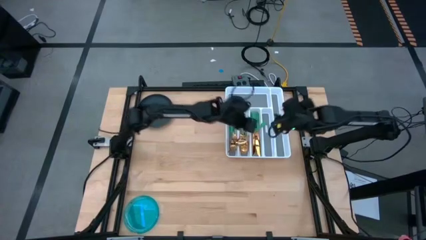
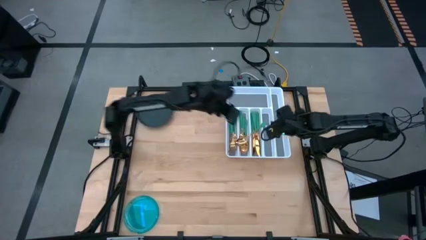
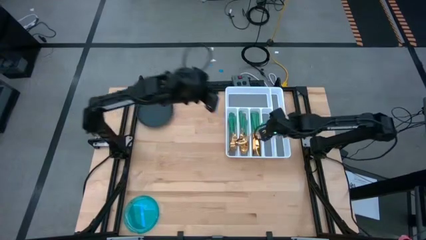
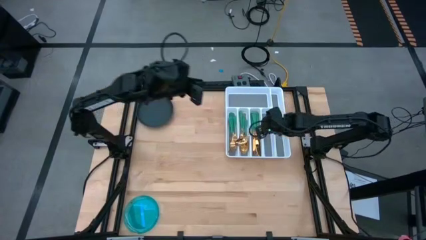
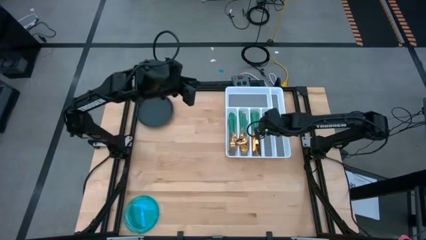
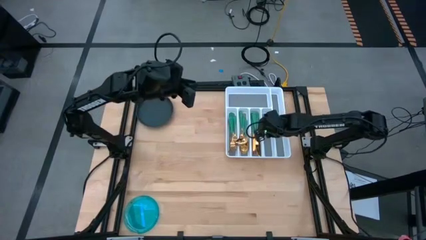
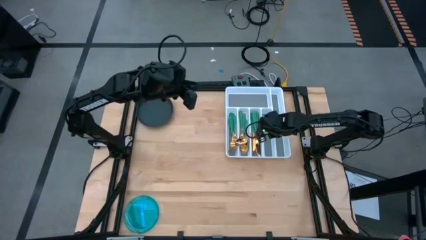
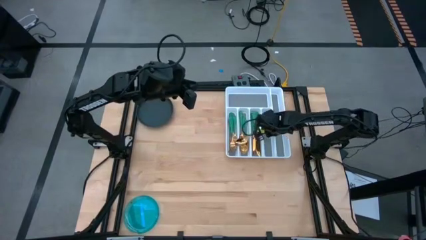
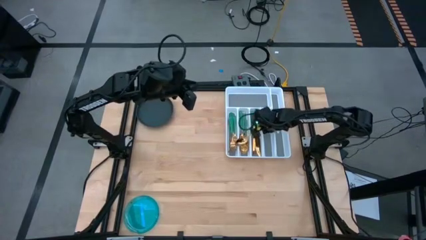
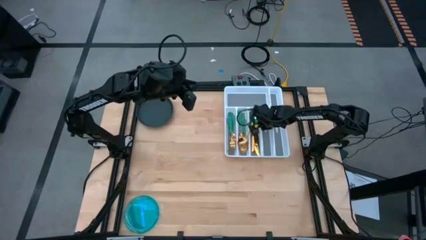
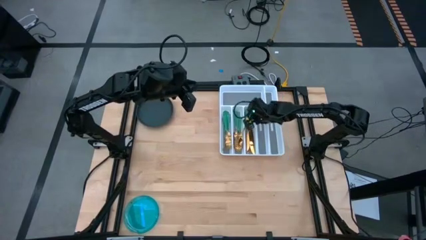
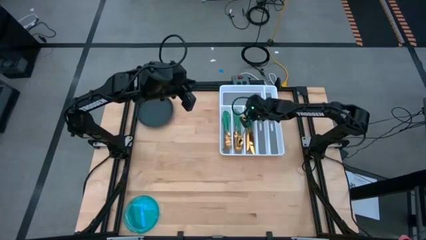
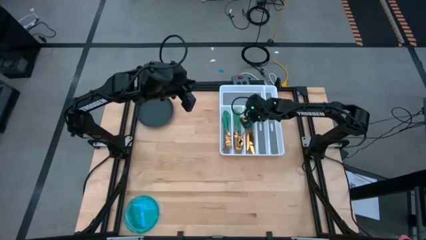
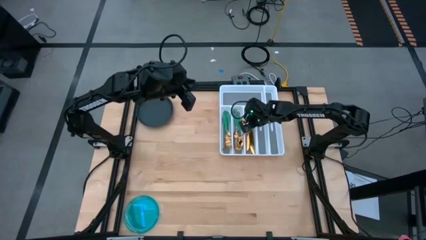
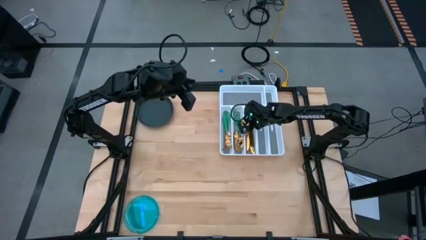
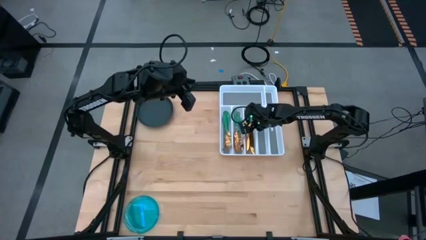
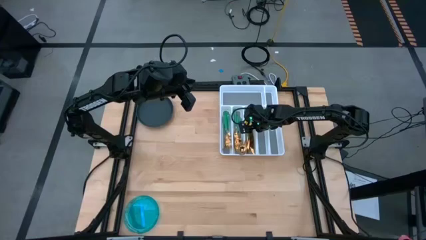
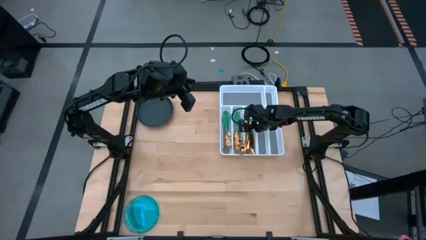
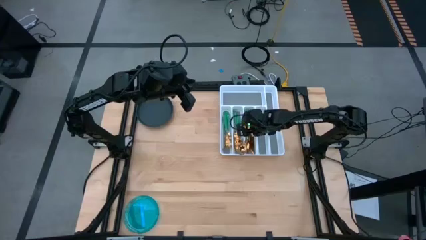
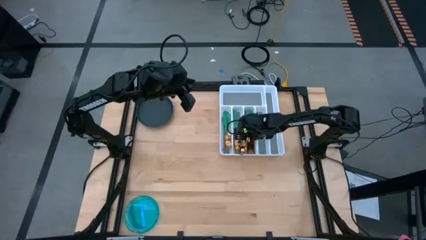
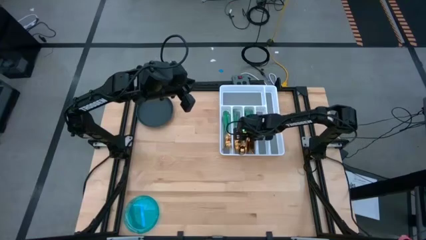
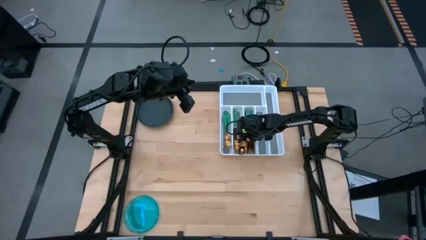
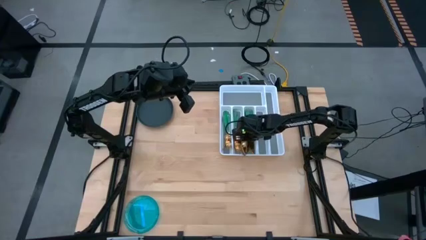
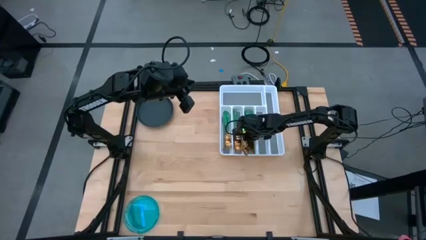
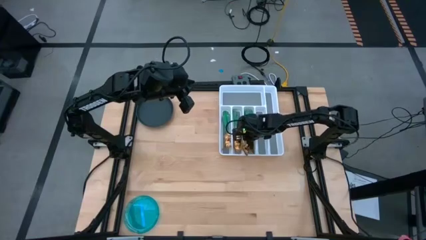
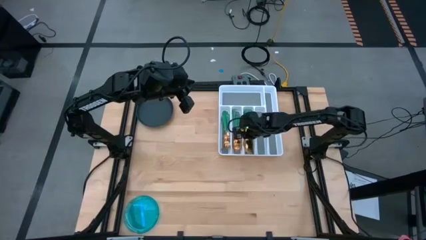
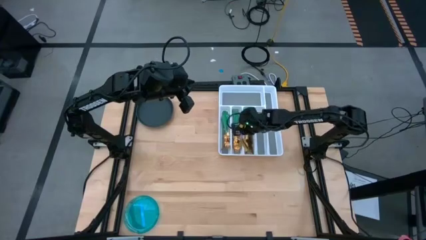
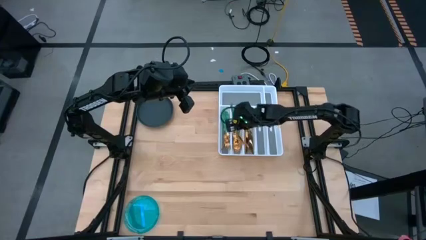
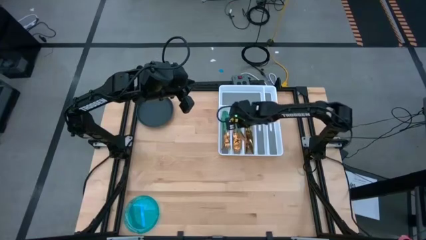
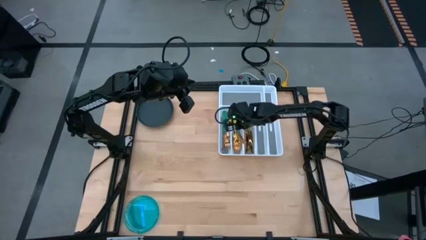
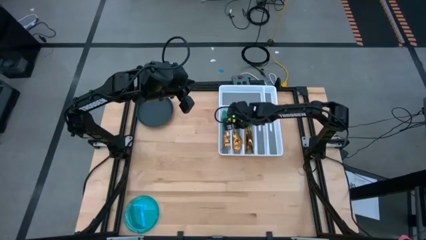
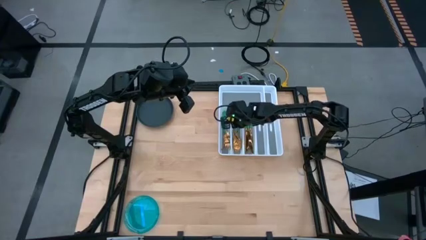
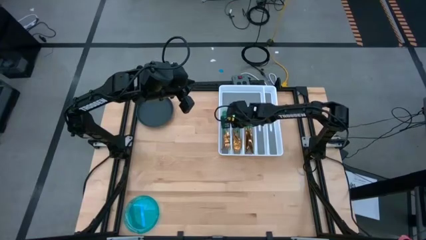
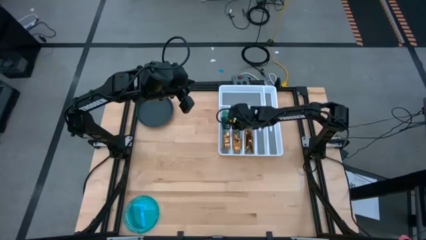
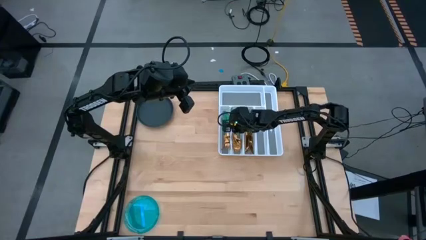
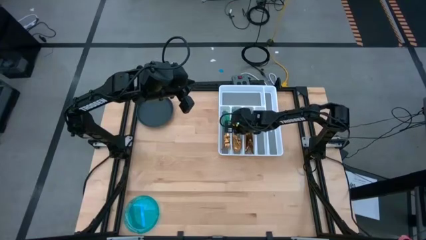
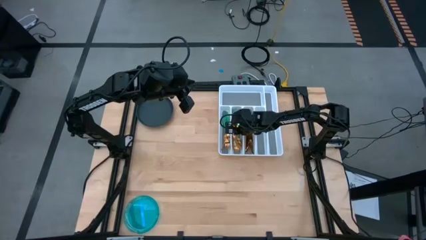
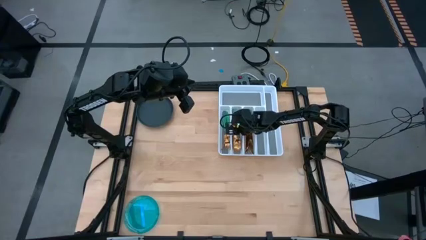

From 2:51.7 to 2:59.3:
Task: Sort silverware
Put the green spoon into the white silverware organizer

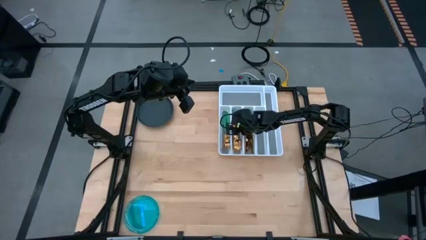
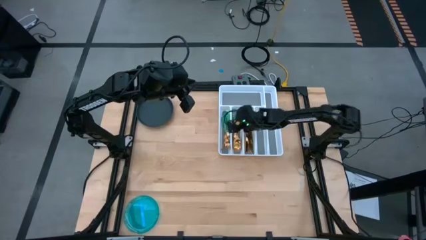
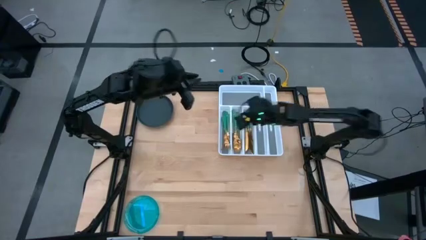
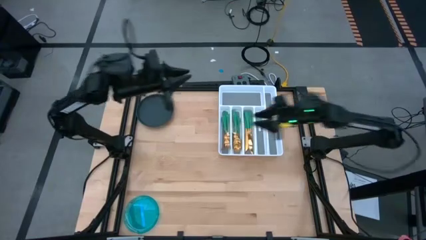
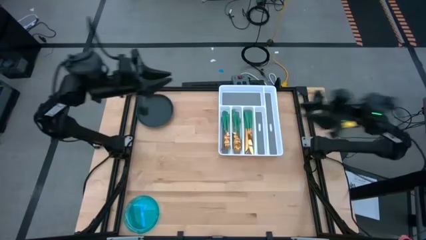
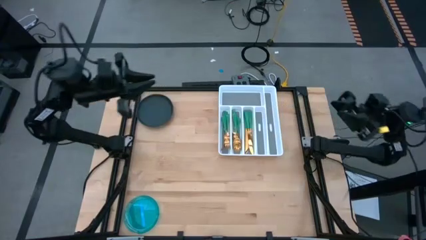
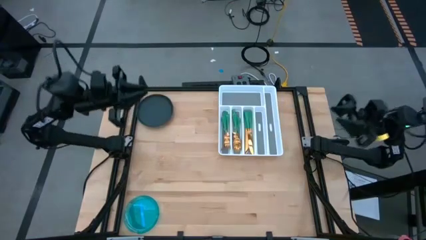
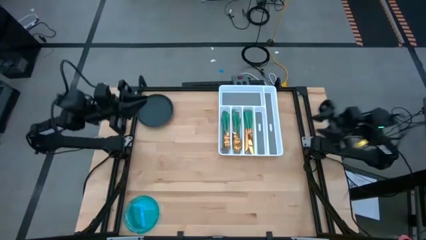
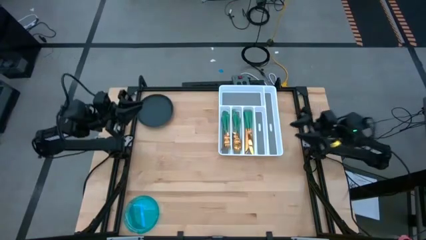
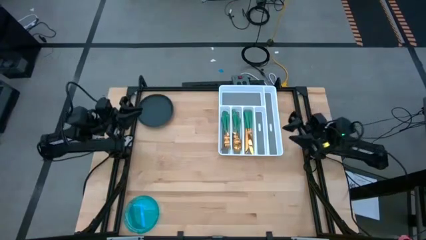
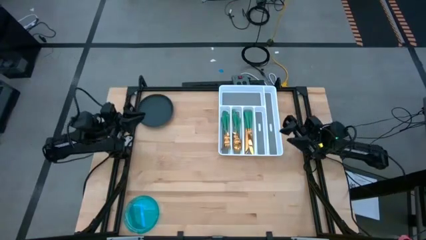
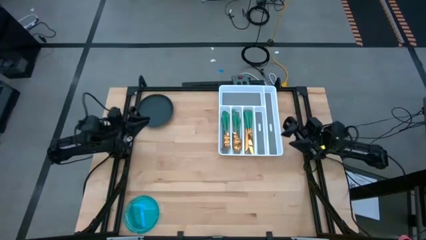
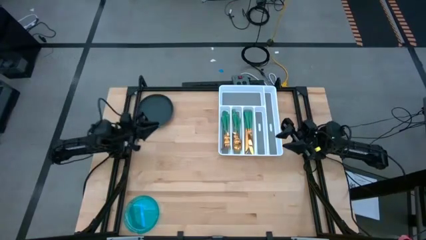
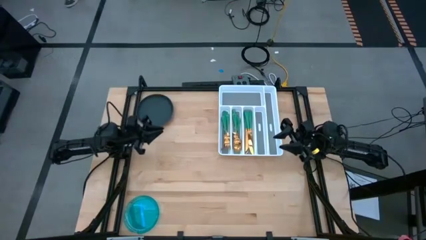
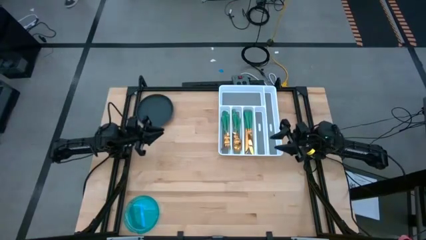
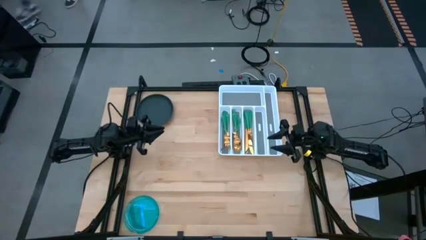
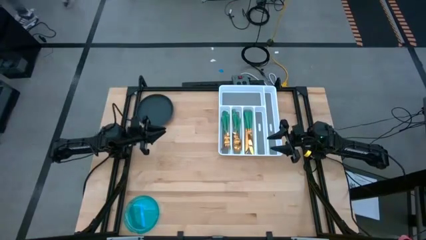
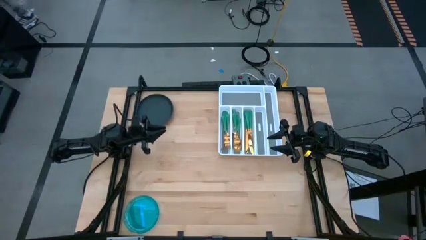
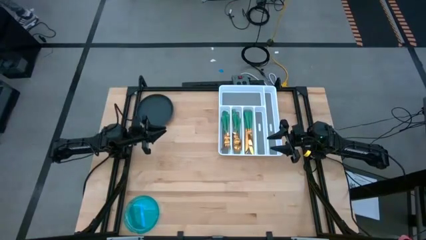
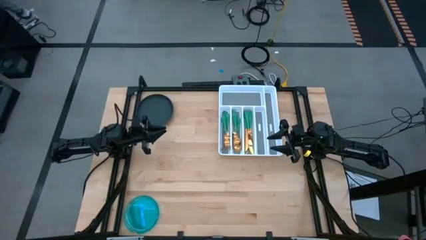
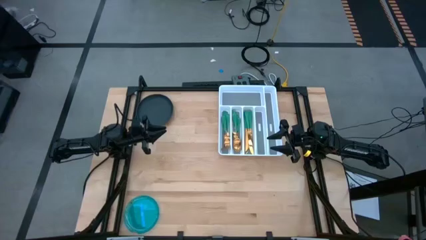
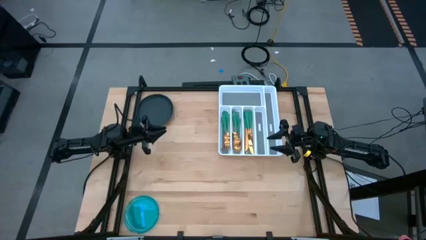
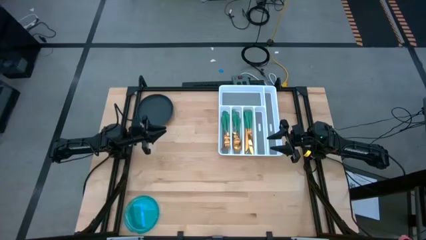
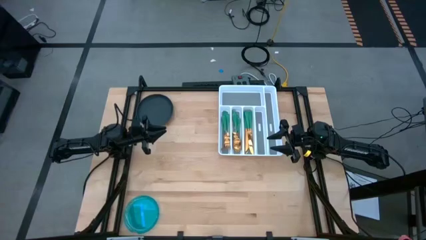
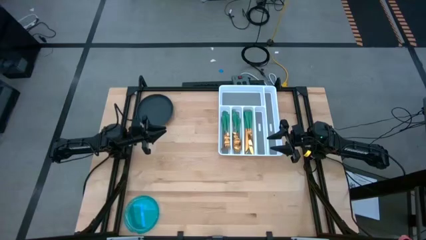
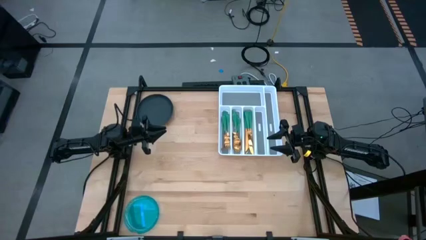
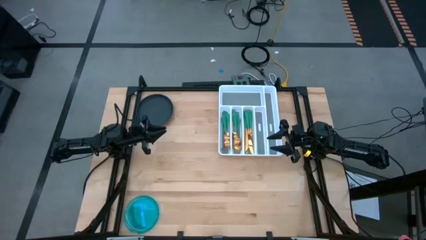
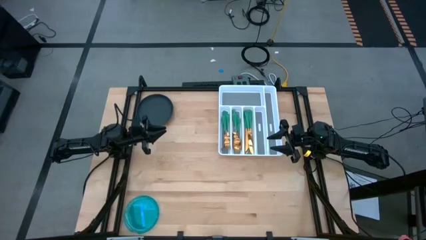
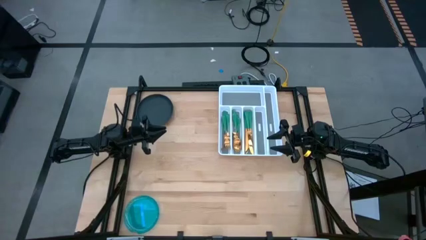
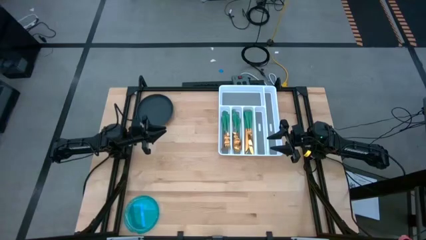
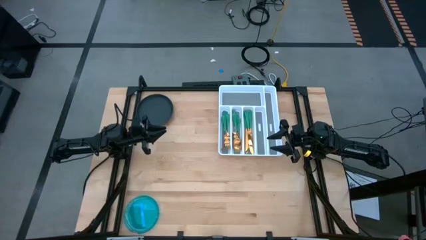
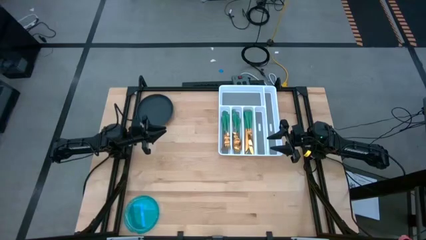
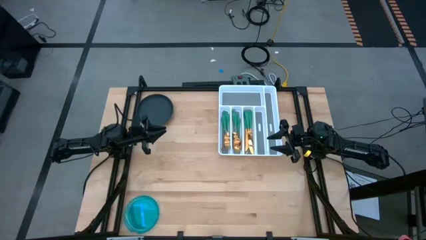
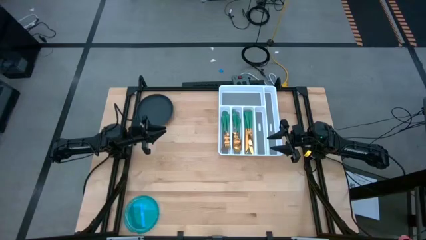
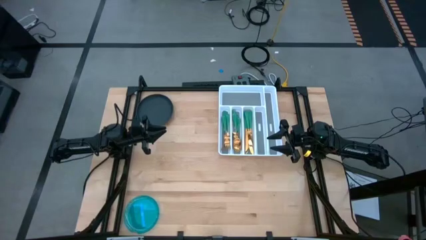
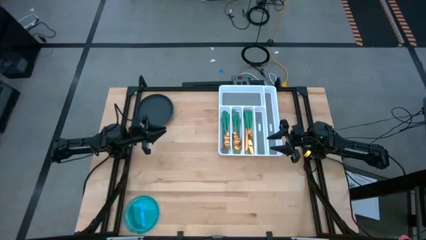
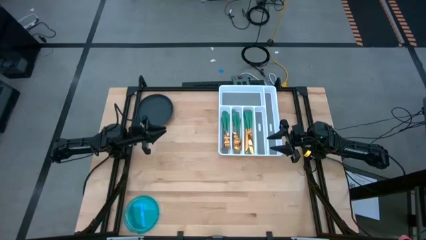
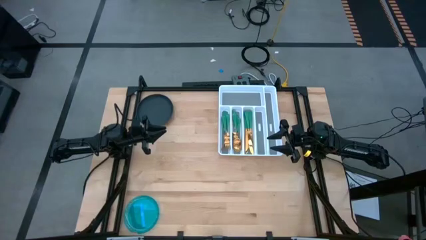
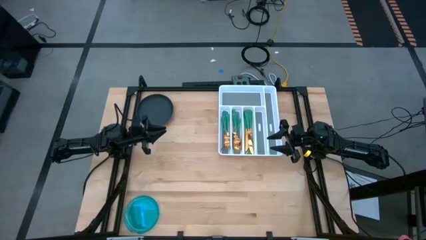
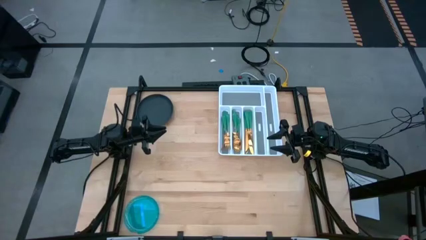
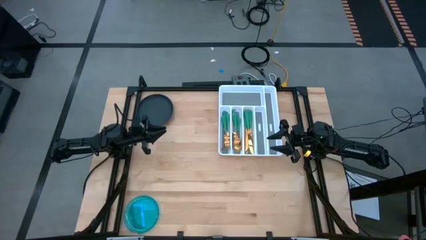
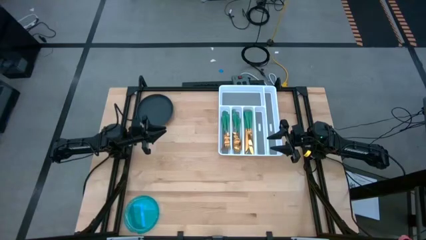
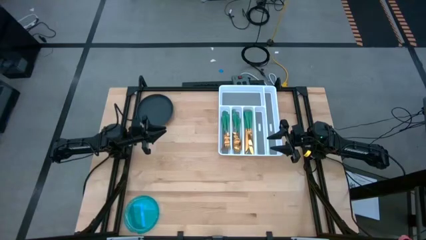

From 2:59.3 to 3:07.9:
Return to Home Position
